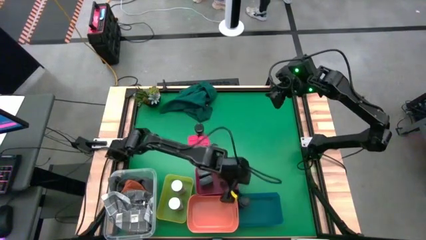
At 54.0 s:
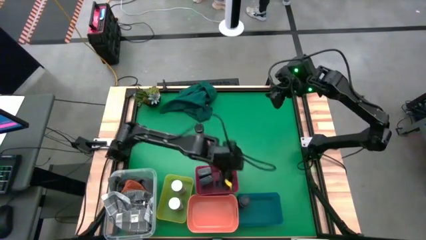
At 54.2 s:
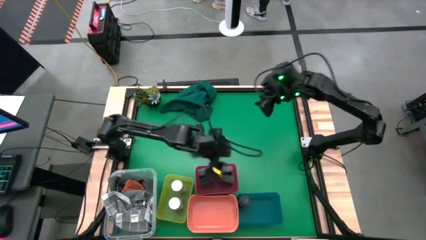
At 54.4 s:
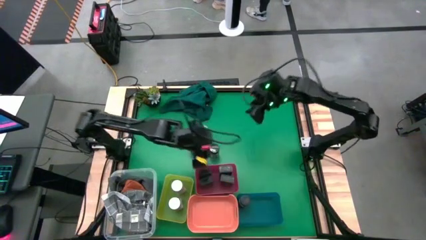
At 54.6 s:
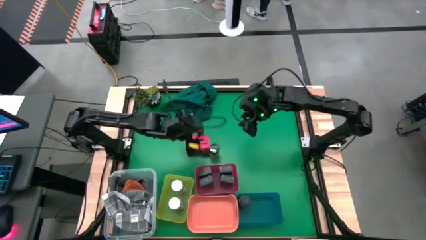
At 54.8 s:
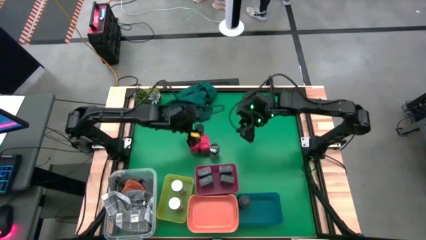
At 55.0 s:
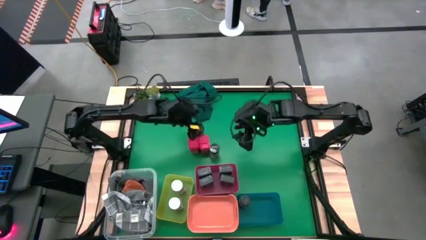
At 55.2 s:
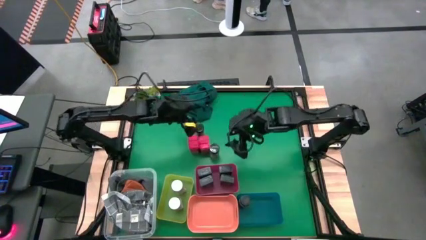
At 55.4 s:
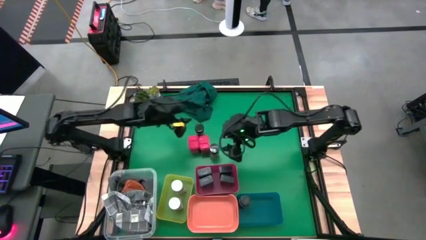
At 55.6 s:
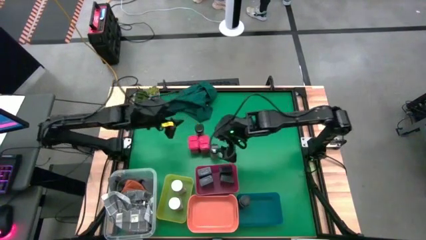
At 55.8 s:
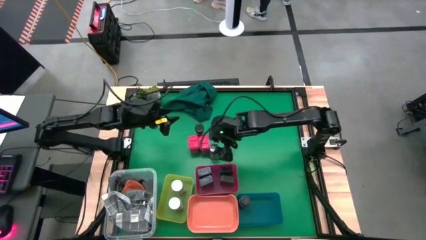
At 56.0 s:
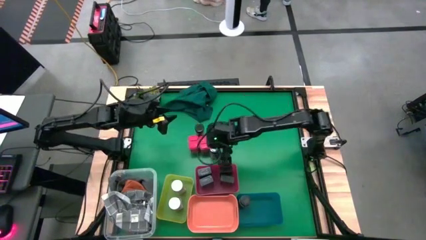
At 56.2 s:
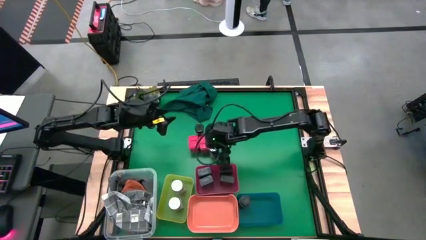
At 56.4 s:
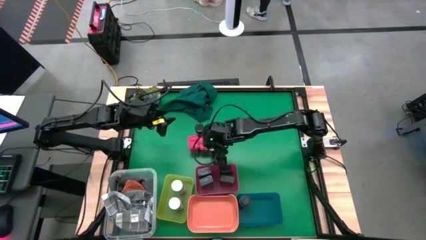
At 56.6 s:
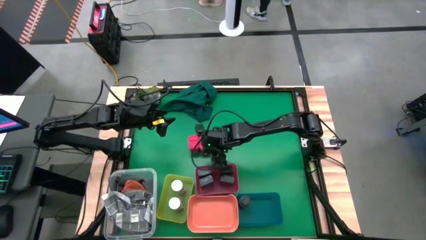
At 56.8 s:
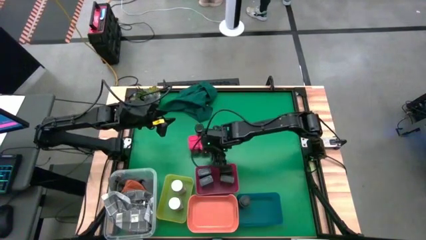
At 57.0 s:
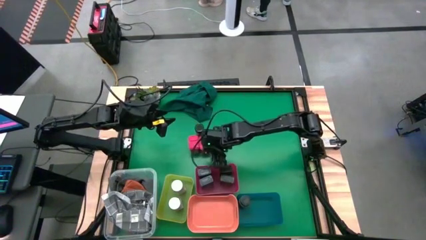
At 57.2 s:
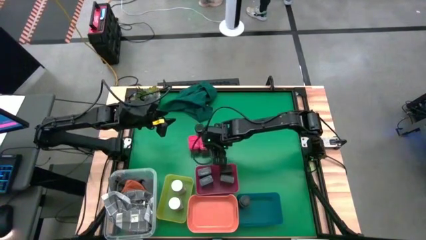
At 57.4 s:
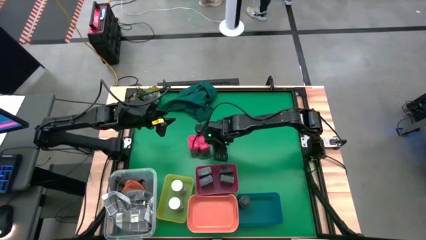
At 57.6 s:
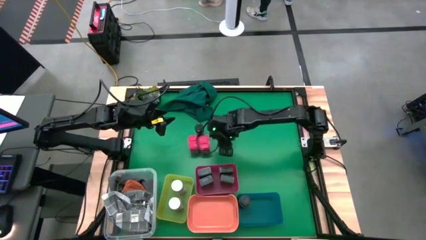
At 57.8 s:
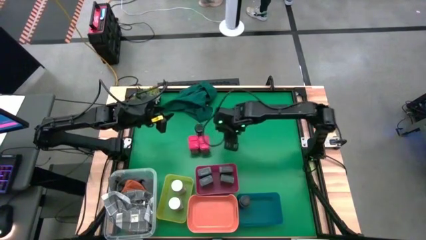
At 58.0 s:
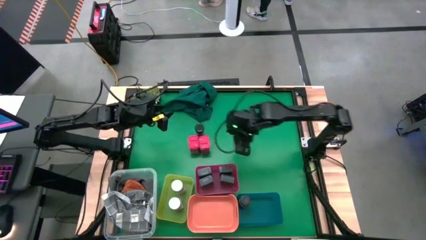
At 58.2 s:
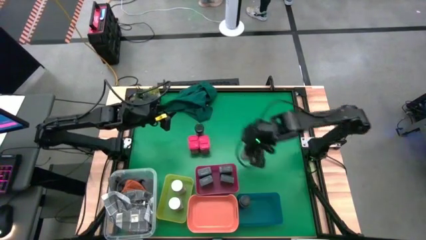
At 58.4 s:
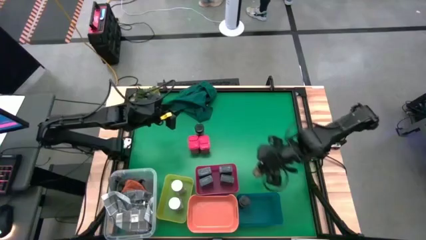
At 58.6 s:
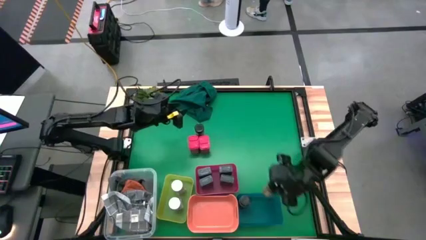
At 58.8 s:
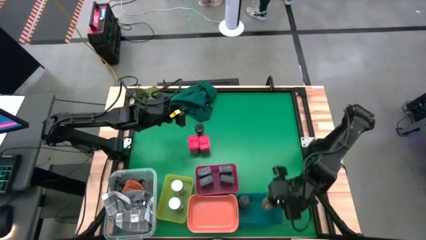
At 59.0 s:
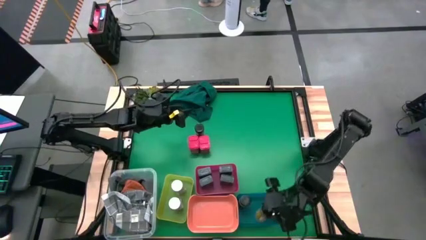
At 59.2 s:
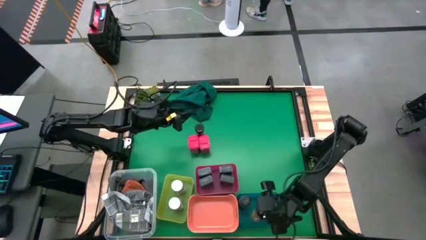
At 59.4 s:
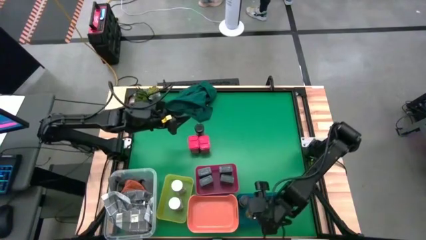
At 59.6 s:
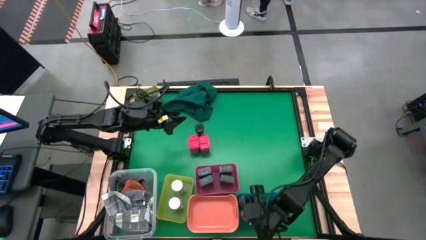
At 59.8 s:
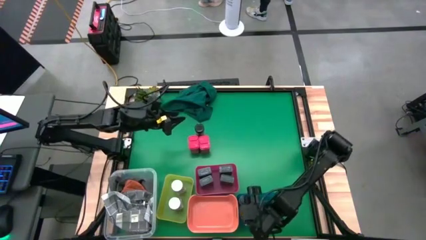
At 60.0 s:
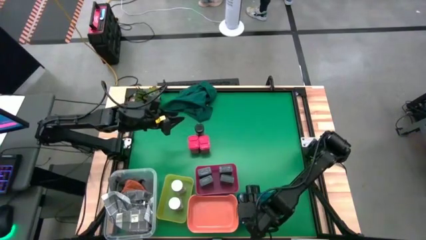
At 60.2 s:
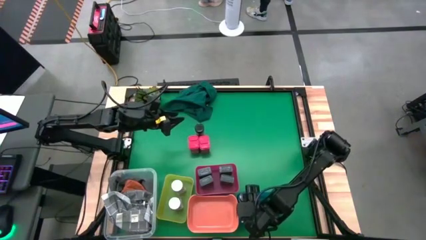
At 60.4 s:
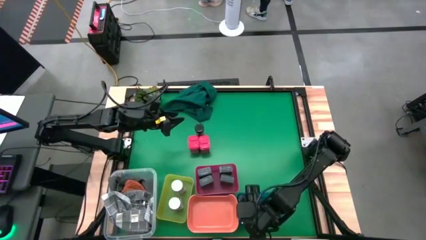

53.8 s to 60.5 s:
Task: Sort spices by type
Put the bottom black seasoning bottle into the blue bin

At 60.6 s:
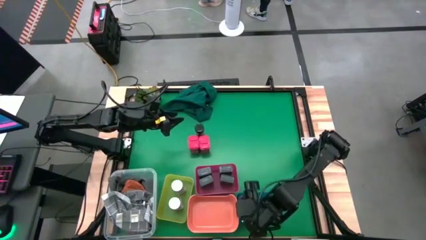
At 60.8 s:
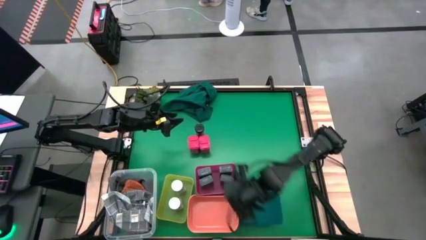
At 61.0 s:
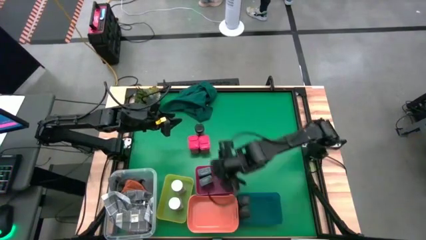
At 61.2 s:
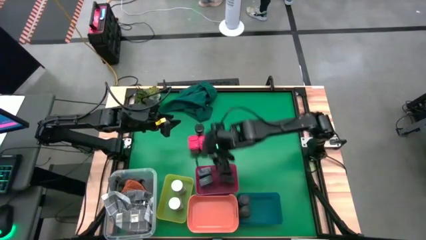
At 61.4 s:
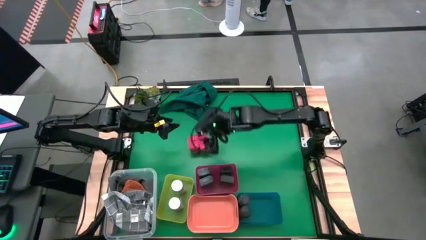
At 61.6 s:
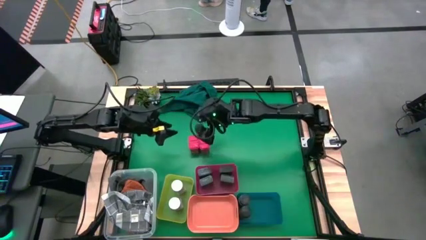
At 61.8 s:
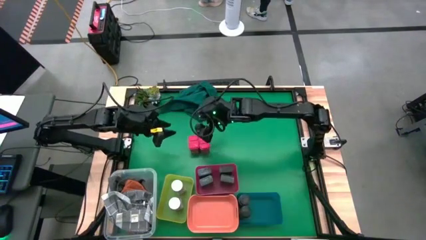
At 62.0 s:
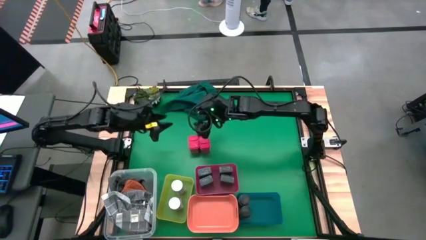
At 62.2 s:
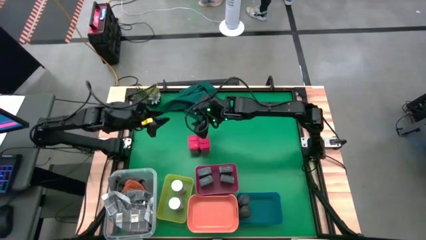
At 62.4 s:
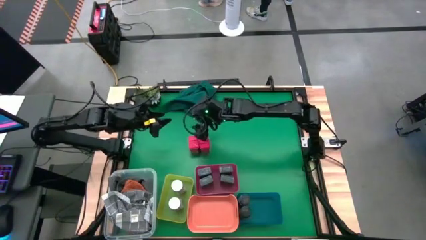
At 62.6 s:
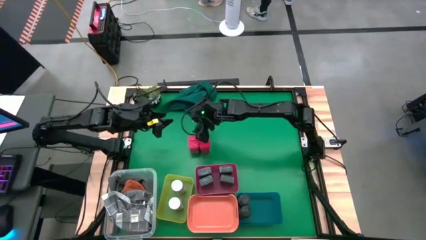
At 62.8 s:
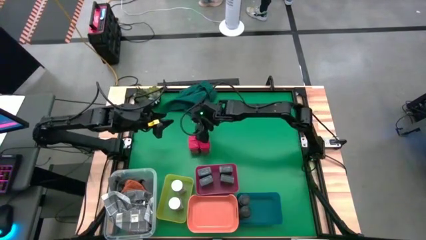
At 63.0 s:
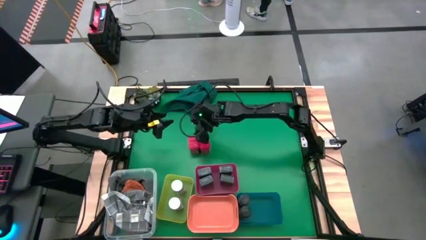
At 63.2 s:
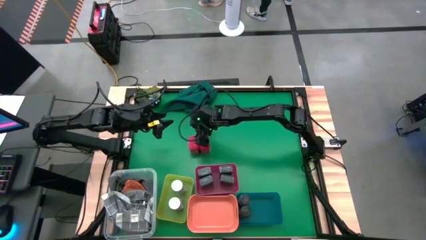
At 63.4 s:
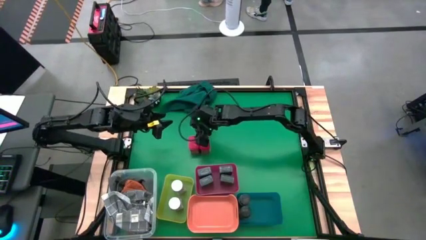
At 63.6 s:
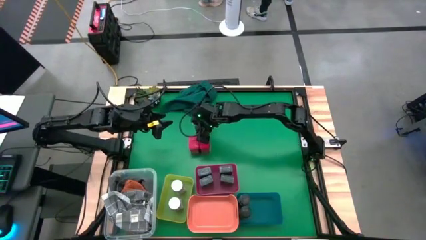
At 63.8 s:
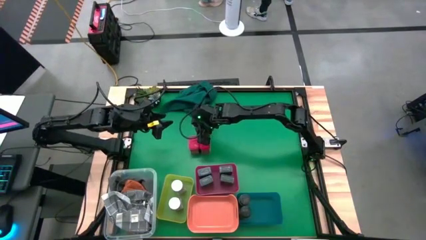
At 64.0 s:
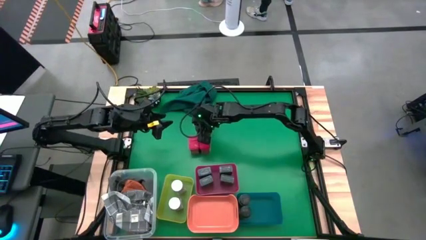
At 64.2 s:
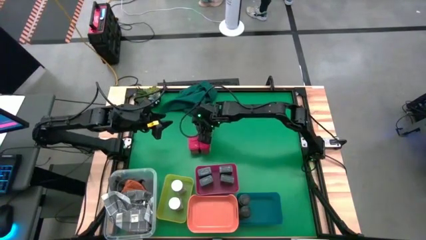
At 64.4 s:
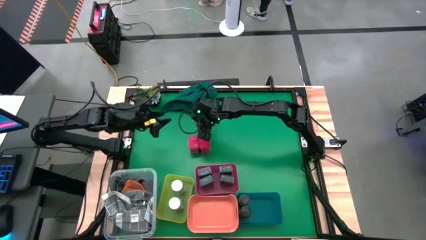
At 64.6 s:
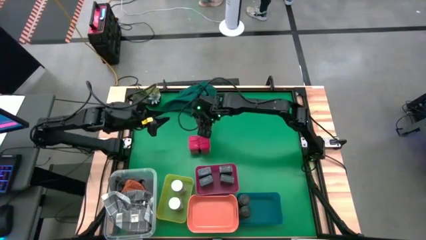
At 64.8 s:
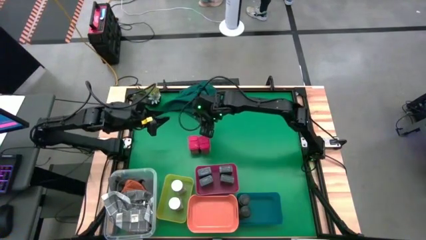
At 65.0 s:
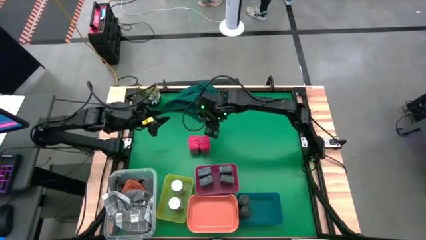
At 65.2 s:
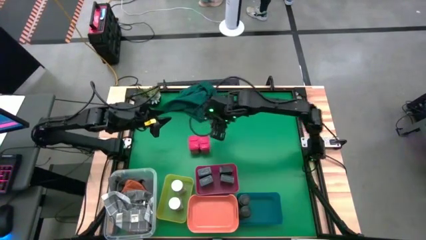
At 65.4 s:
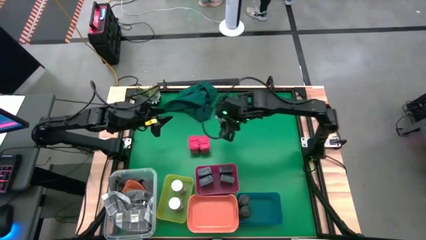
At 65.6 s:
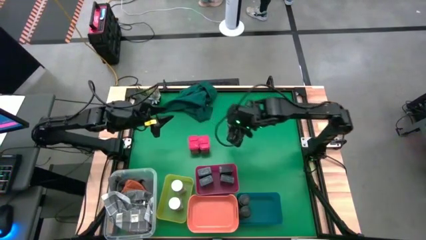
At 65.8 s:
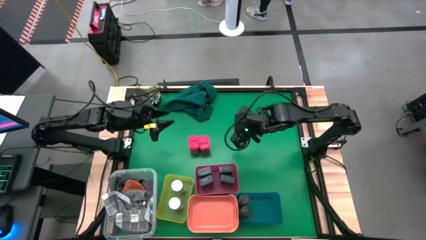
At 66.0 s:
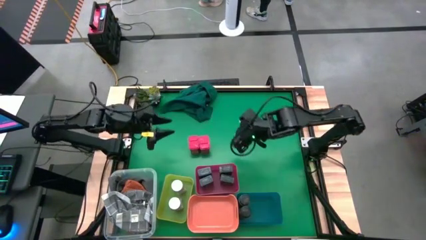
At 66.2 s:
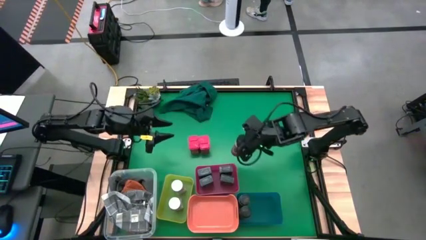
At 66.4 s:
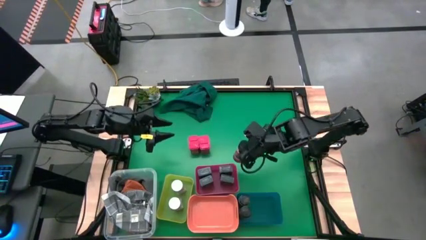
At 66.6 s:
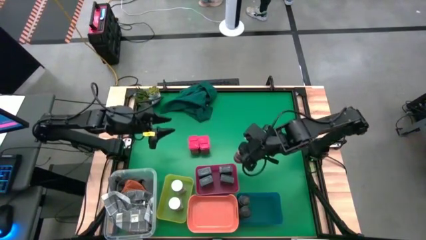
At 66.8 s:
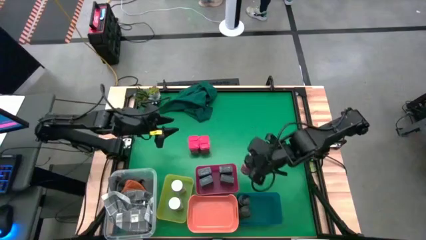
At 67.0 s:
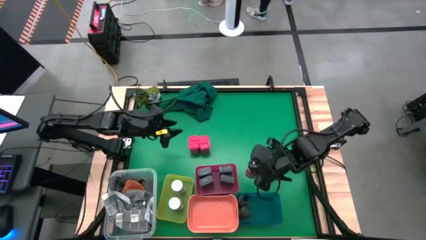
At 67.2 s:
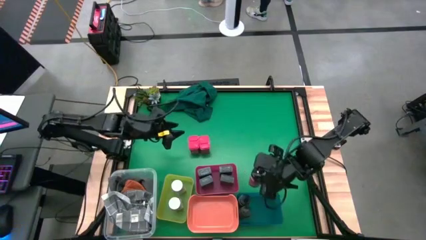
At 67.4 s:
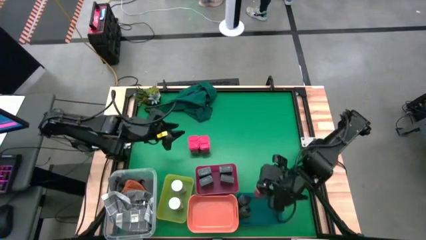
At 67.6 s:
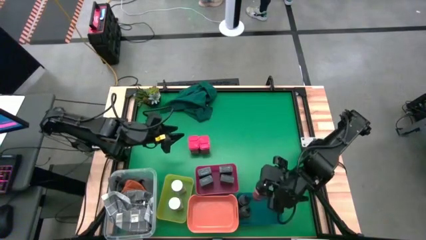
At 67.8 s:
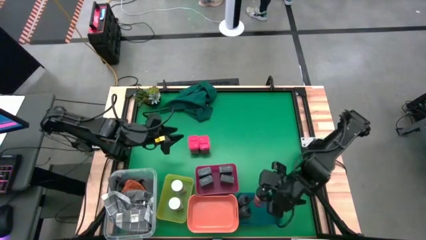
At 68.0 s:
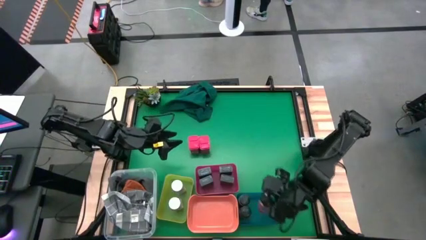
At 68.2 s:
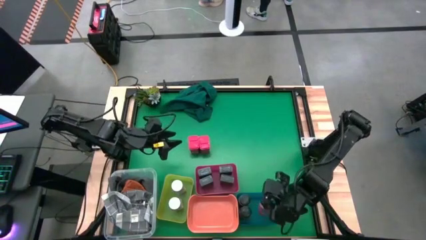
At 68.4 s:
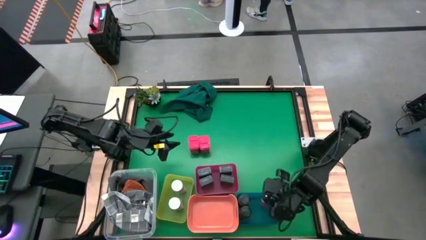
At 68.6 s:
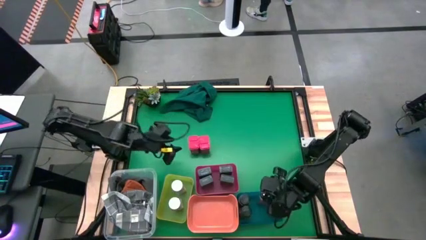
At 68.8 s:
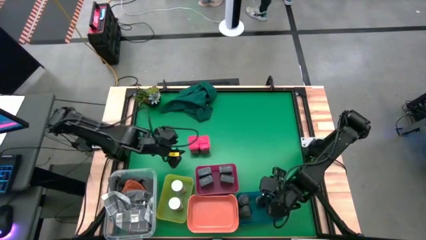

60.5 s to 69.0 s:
Put the black seasoning bottle into the blue bin
